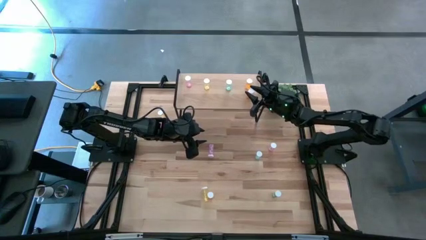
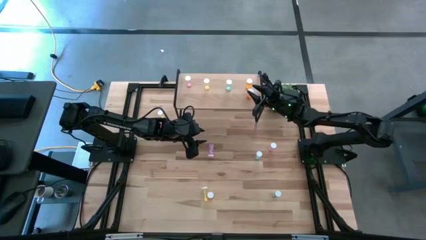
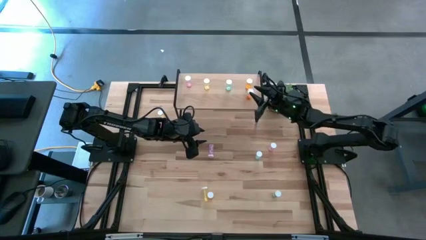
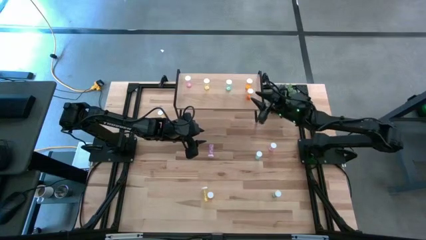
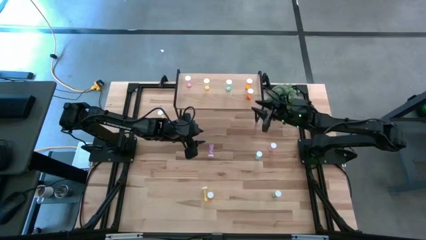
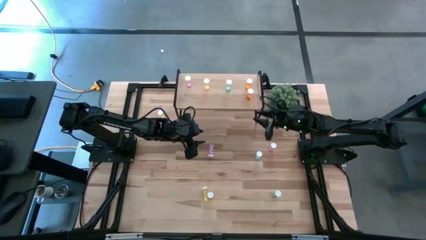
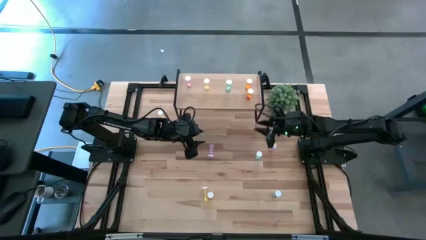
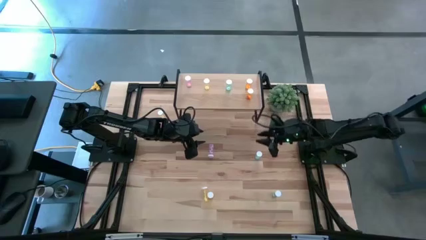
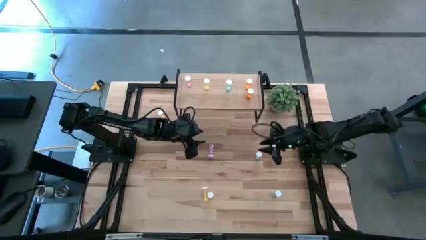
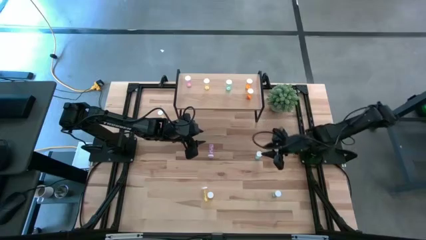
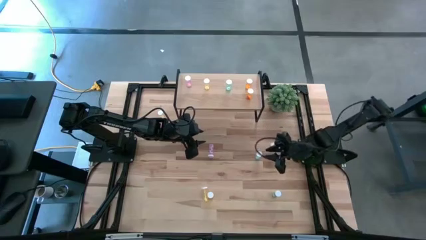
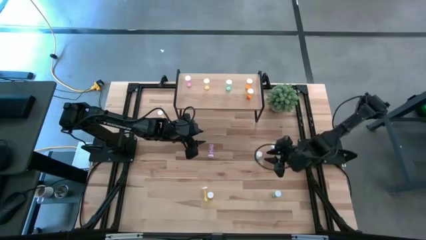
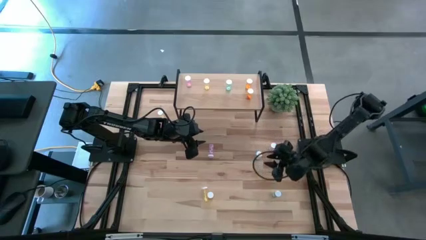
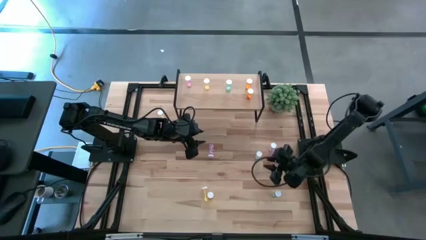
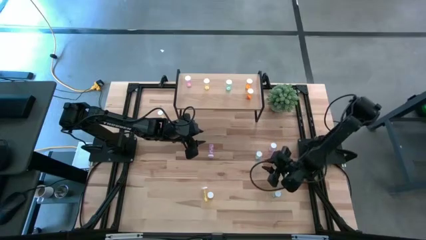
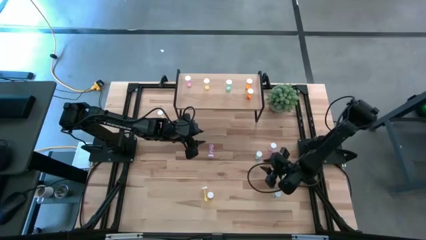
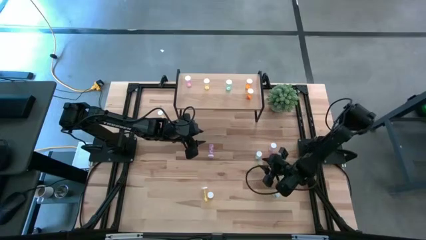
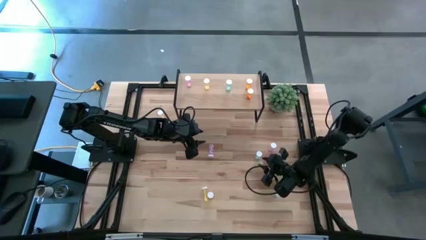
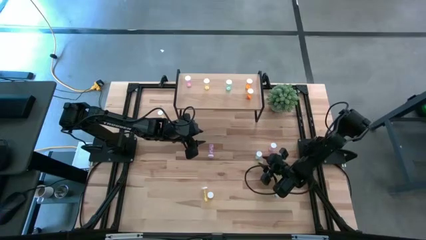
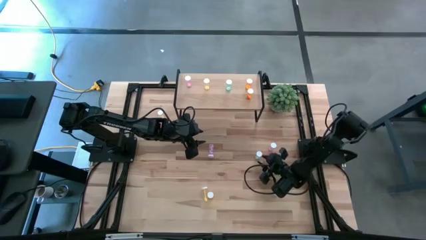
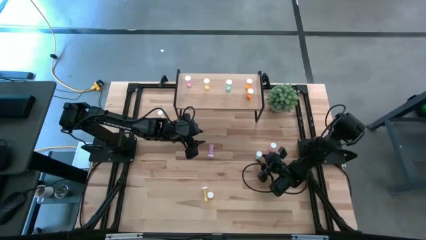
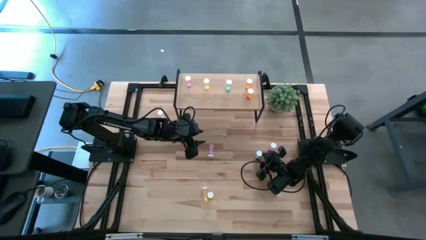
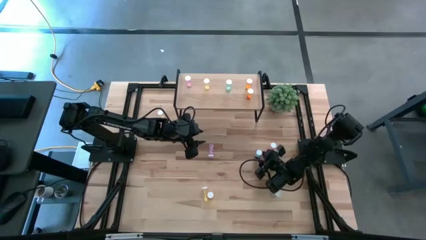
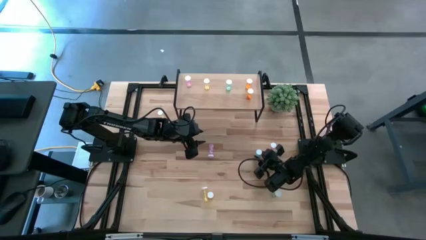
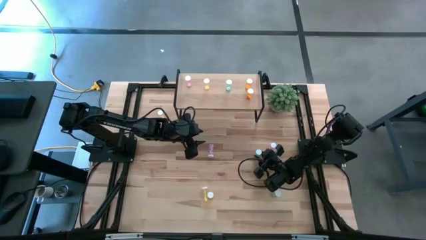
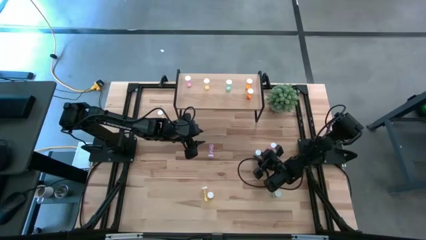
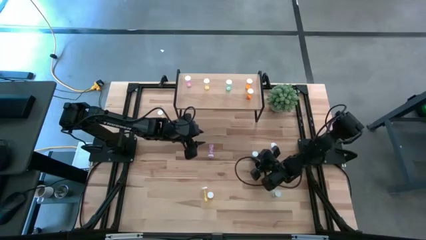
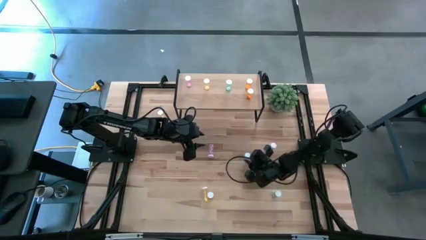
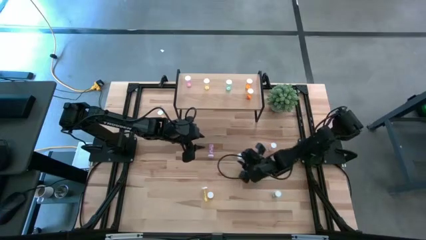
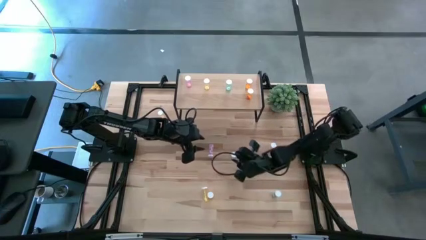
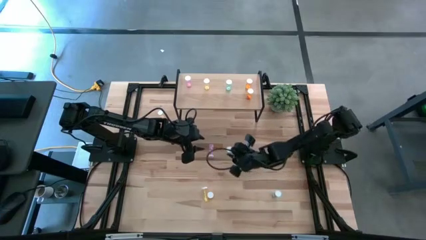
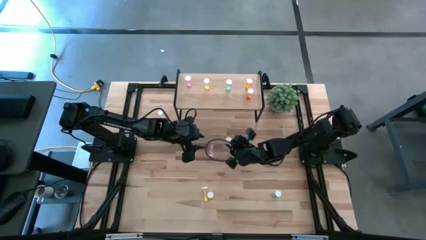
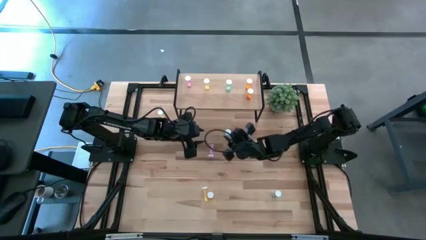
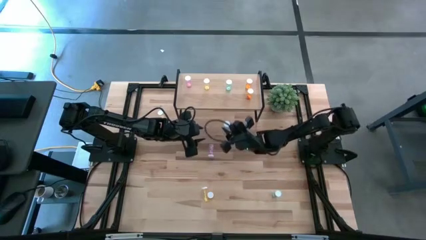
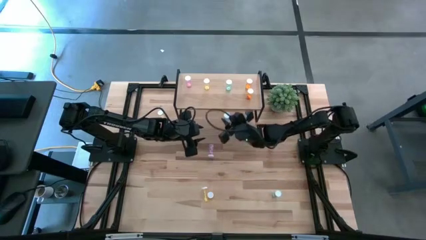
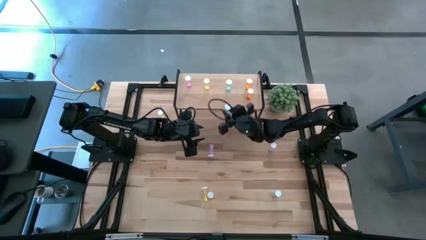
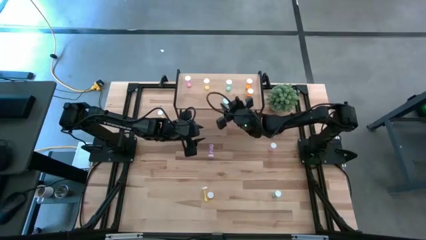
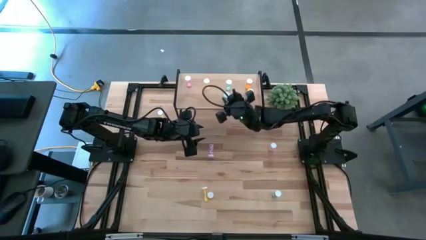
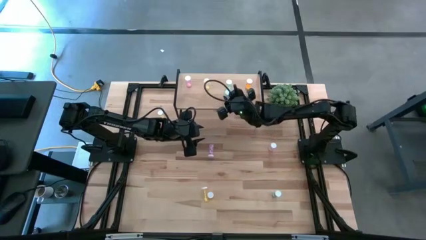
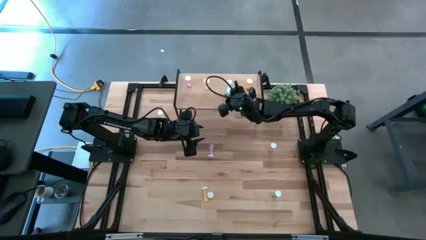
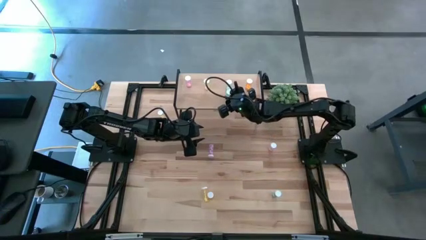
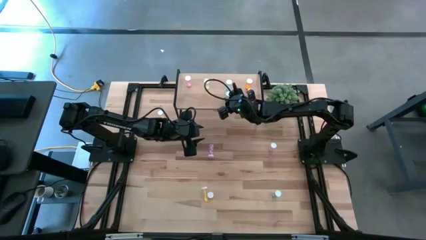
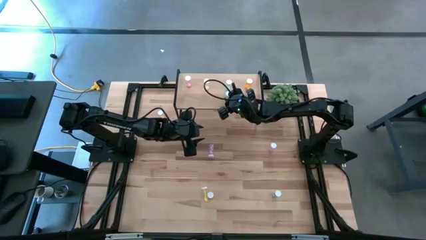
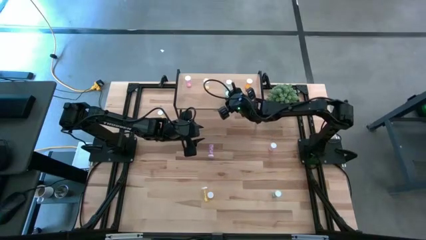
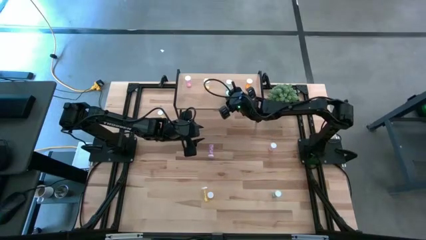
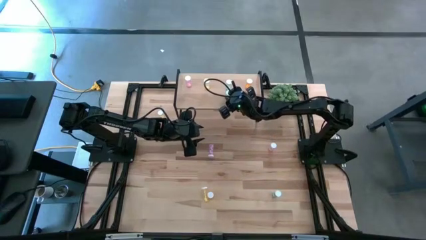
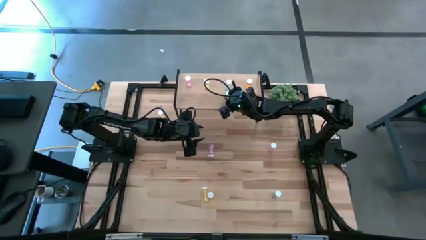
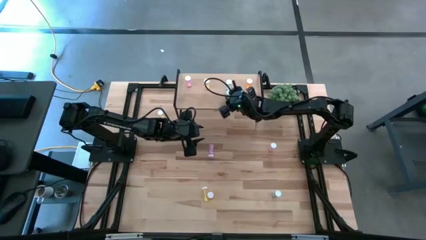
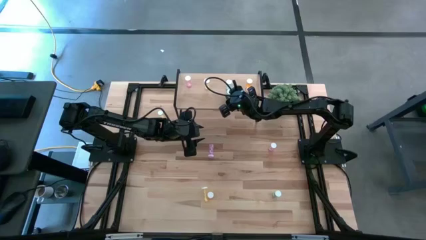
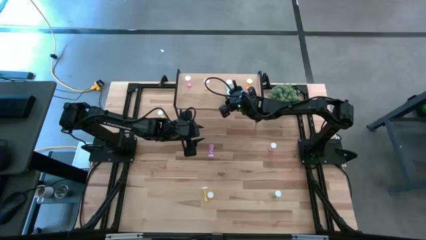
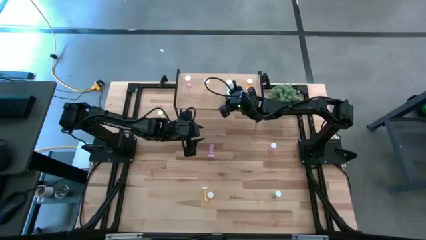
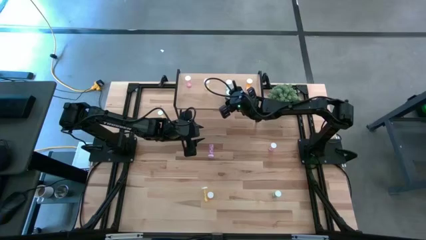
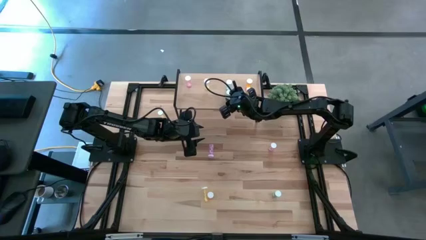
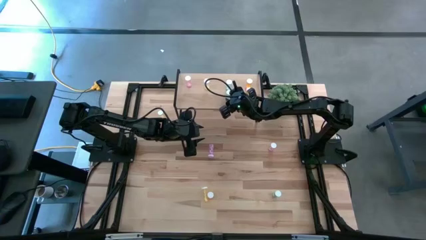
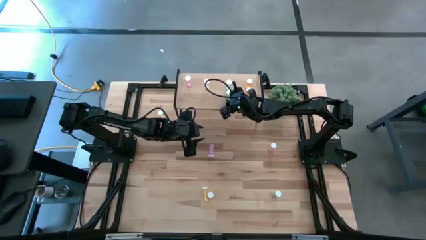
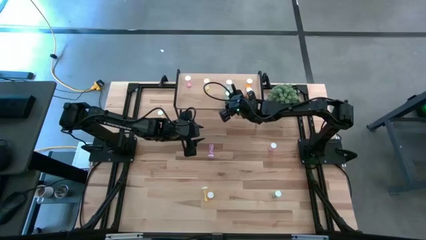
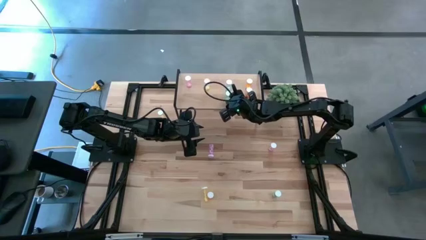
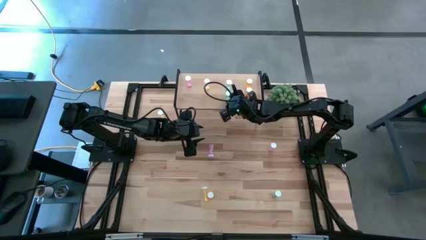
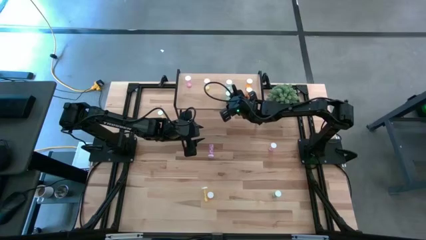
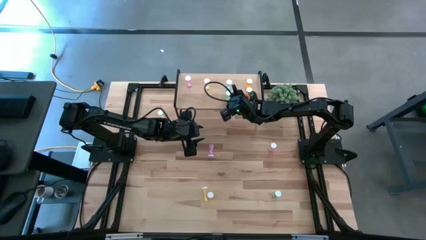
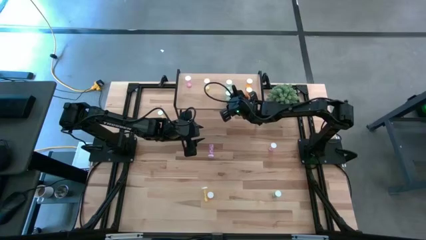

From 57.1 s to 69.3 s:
Task: Pick and place medicine bottles onto shelf by color
Put the top blue pill bottle aligned with the other blue pill bottle on the shelf

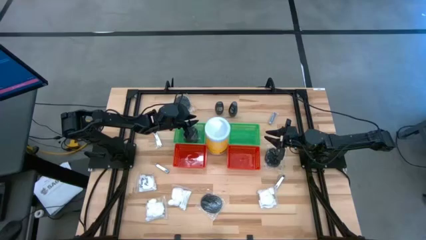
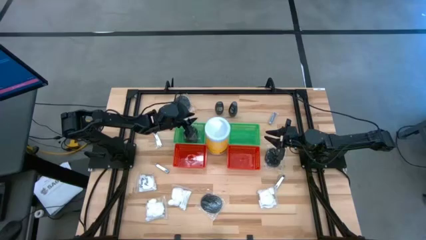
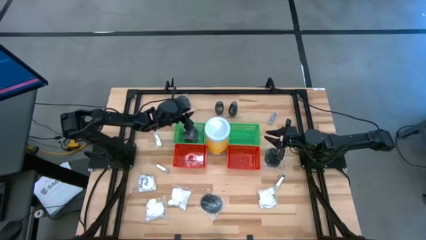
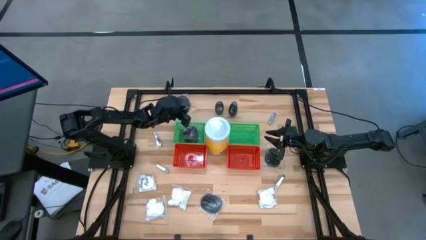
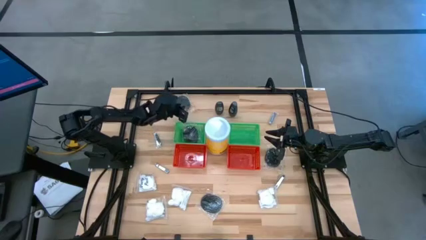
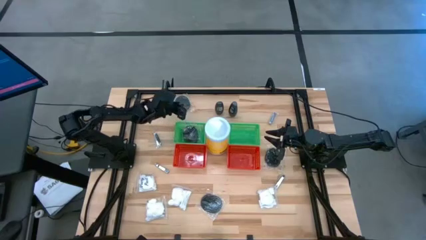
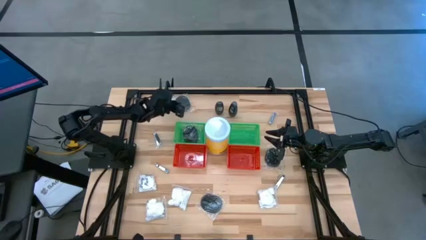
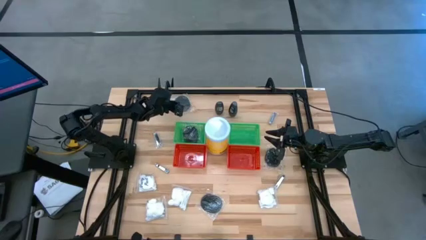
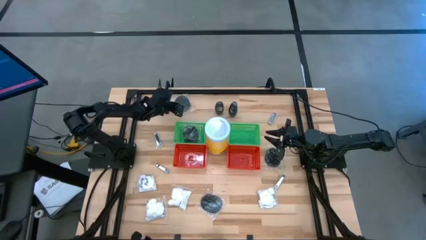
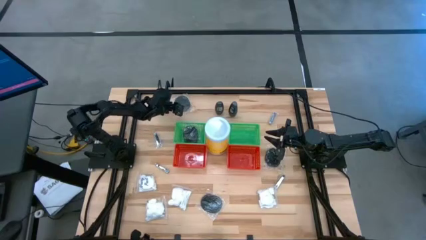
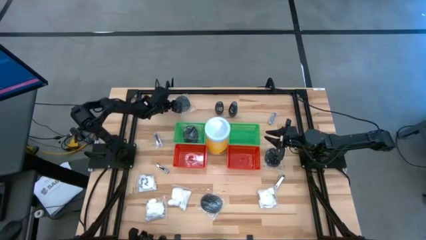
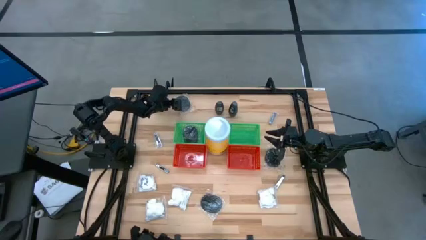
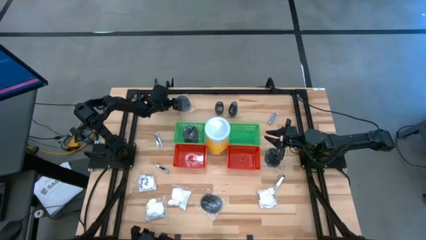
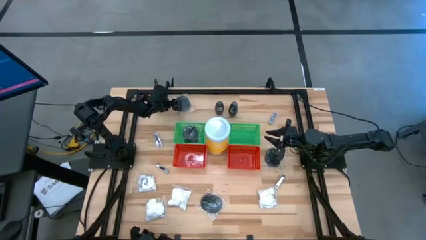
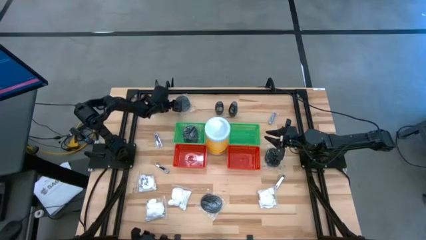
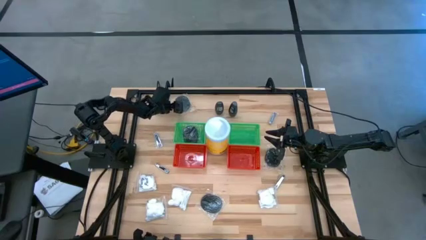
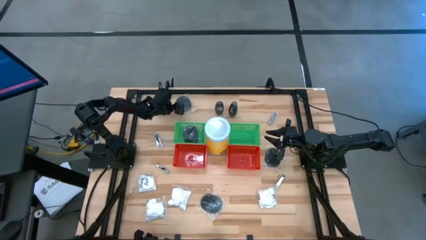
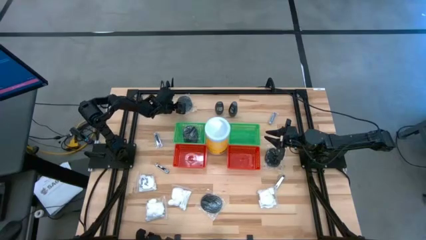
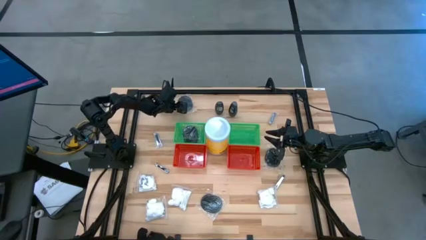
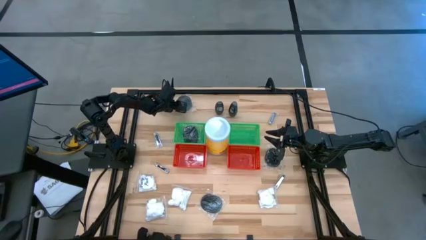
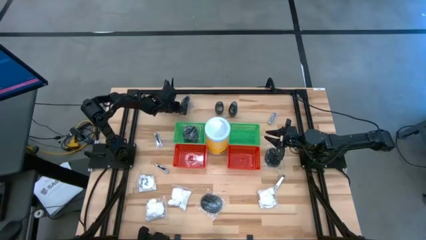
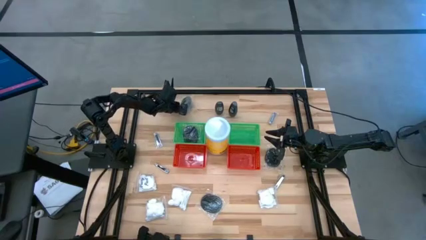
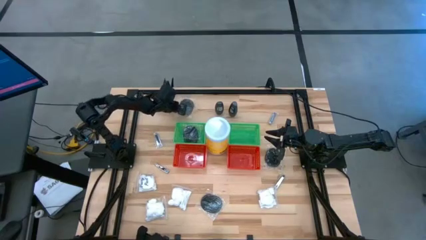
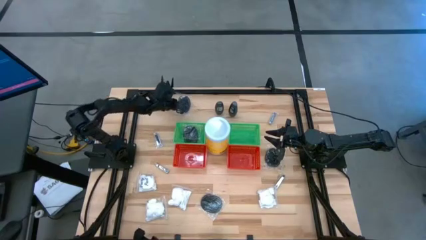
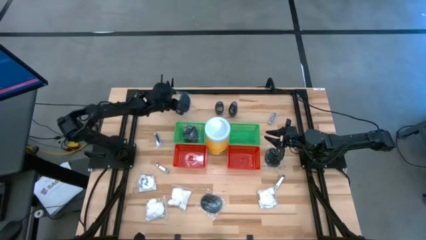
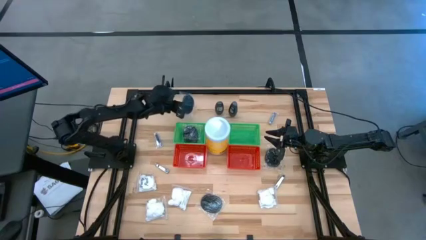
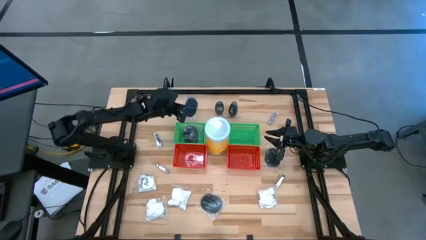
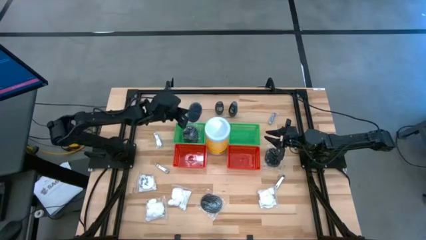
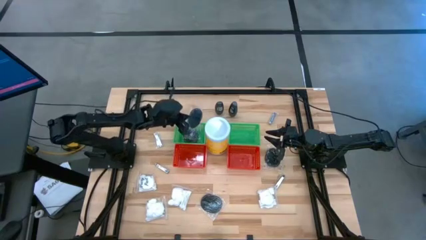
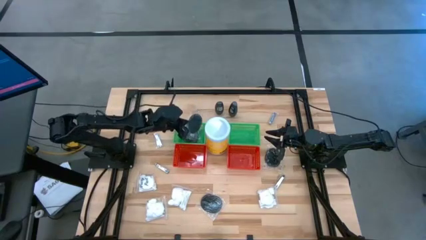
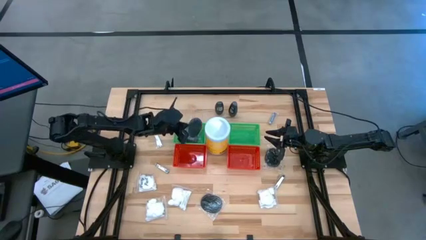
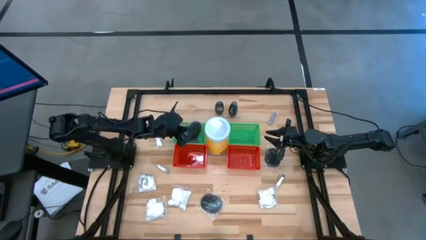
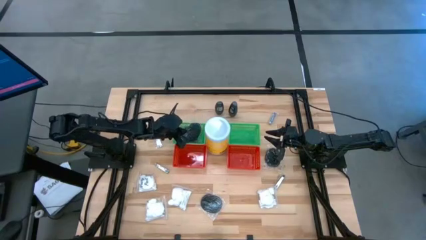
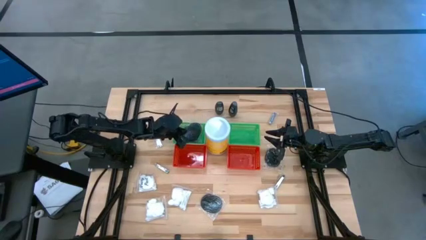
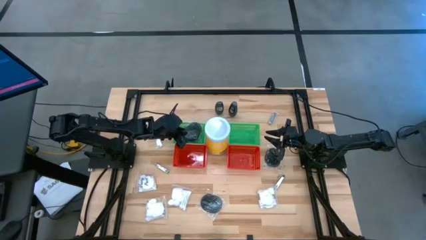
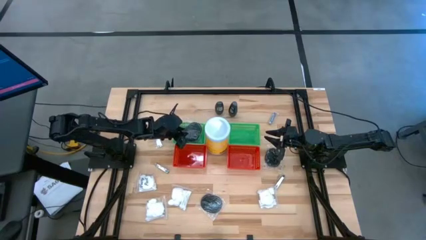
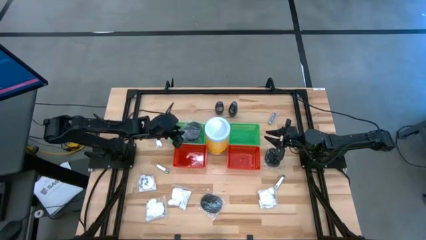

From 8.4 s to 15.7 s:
Task: Pick & Place Travel size toiletries
Put the top left hairbrush into the left green basket
